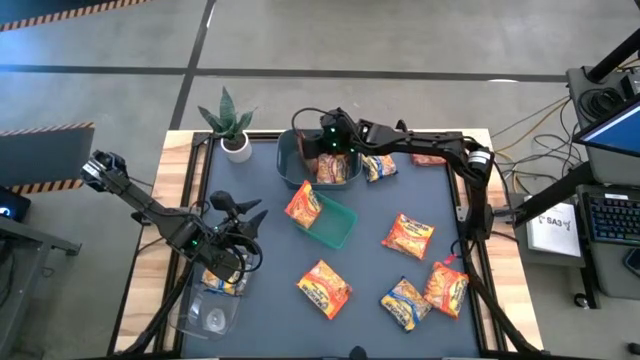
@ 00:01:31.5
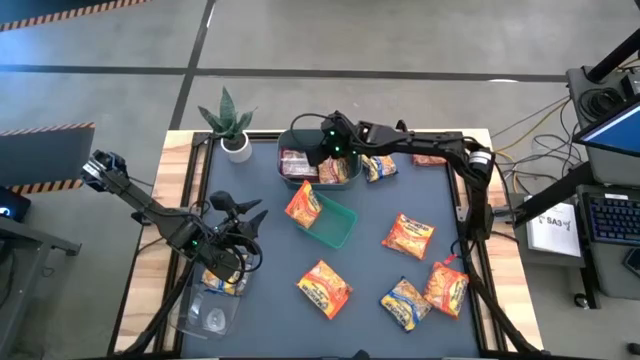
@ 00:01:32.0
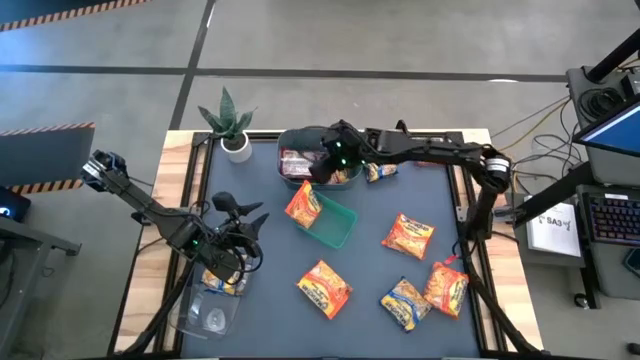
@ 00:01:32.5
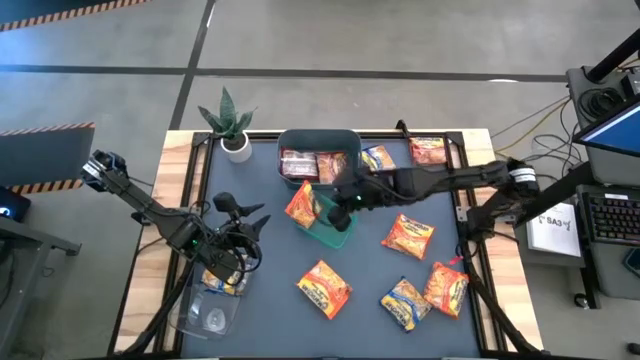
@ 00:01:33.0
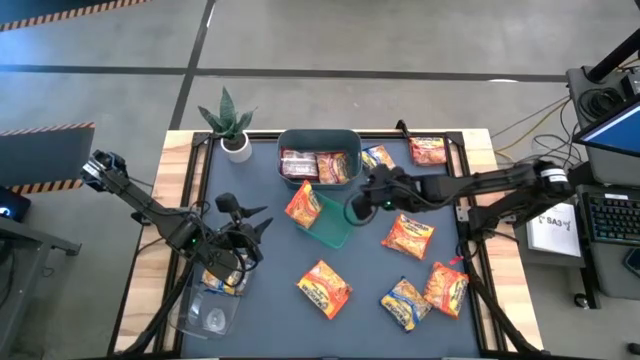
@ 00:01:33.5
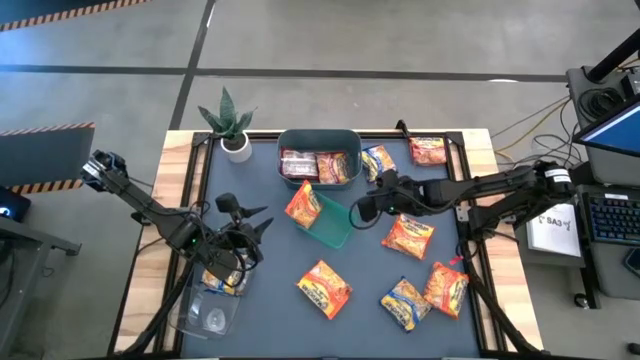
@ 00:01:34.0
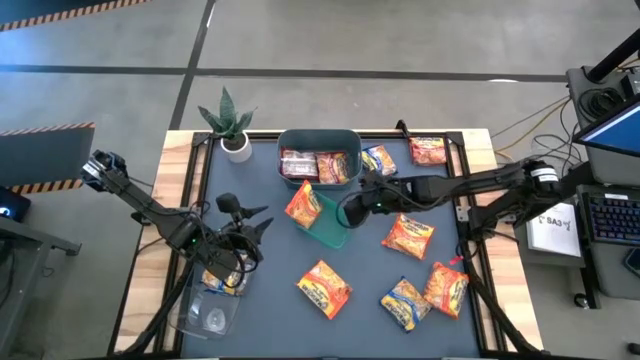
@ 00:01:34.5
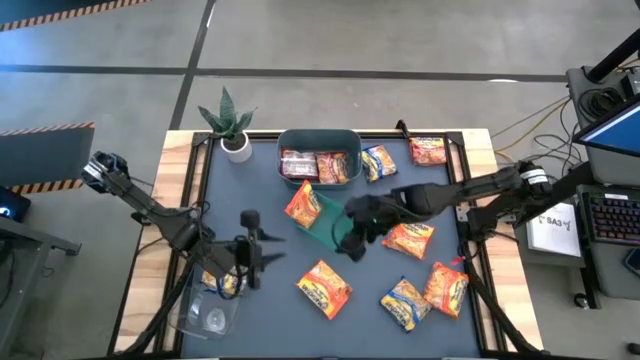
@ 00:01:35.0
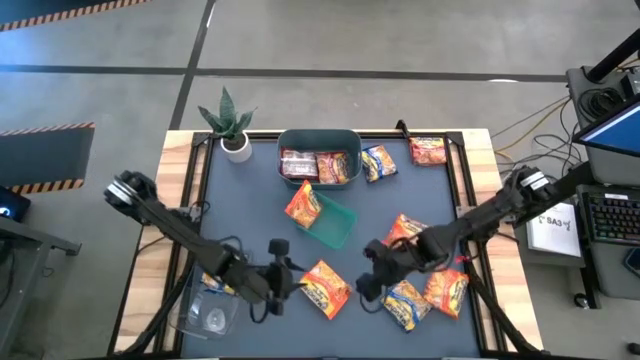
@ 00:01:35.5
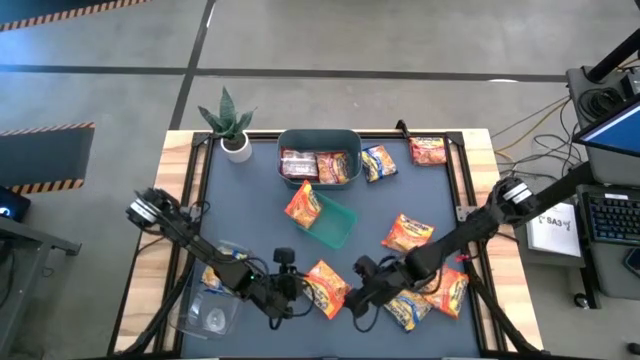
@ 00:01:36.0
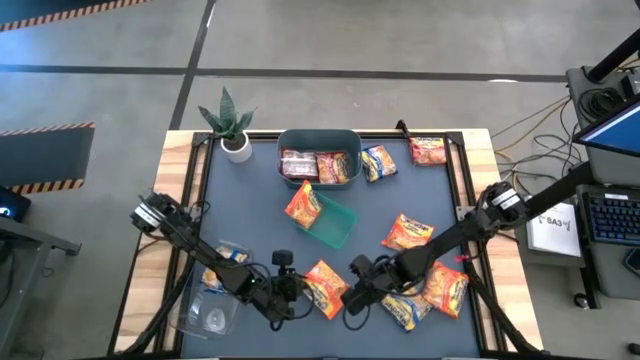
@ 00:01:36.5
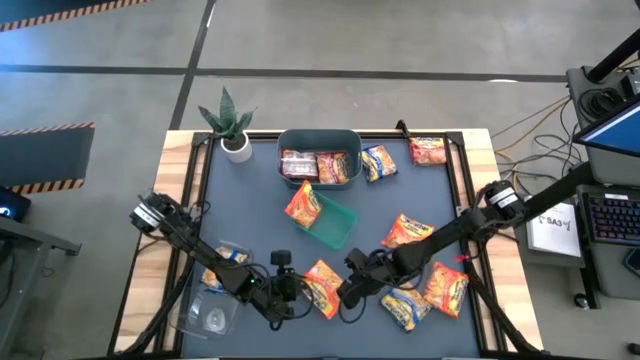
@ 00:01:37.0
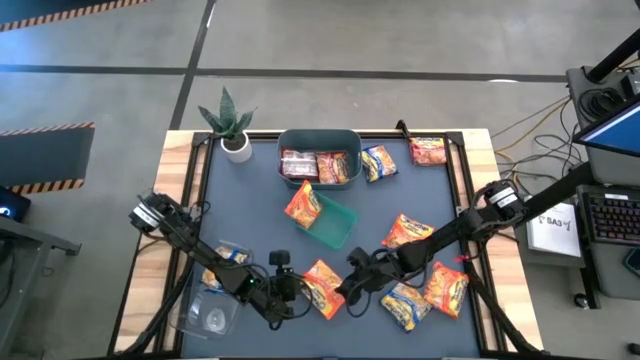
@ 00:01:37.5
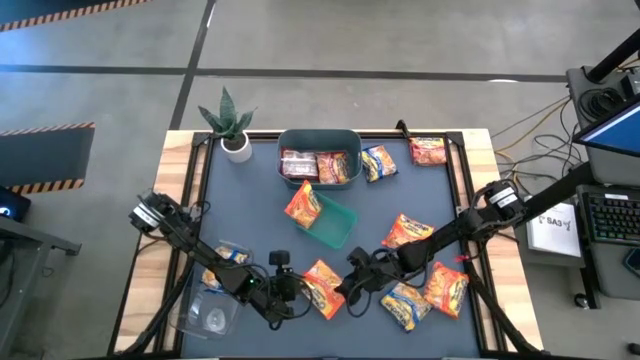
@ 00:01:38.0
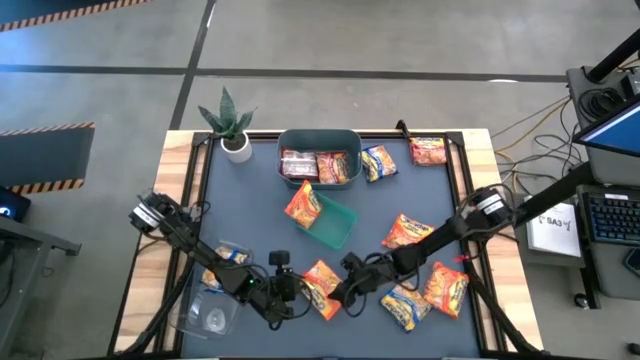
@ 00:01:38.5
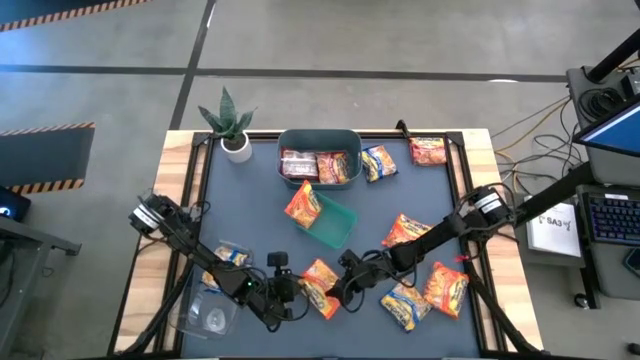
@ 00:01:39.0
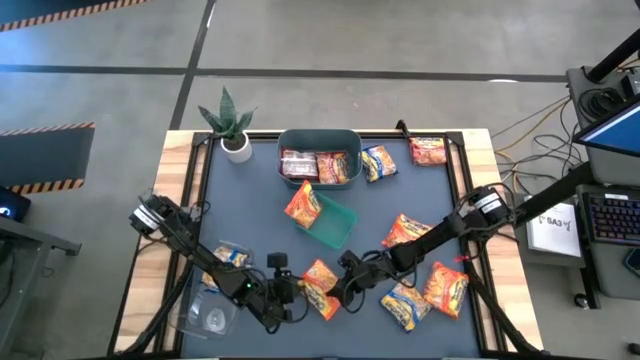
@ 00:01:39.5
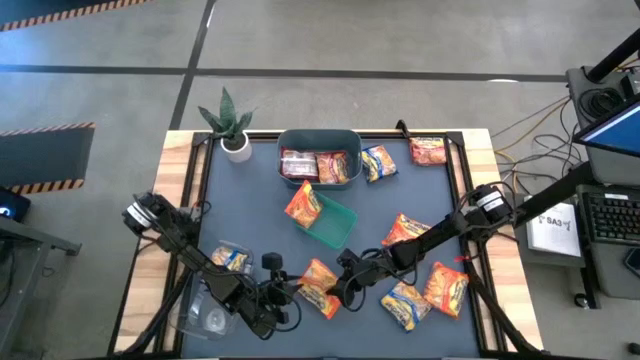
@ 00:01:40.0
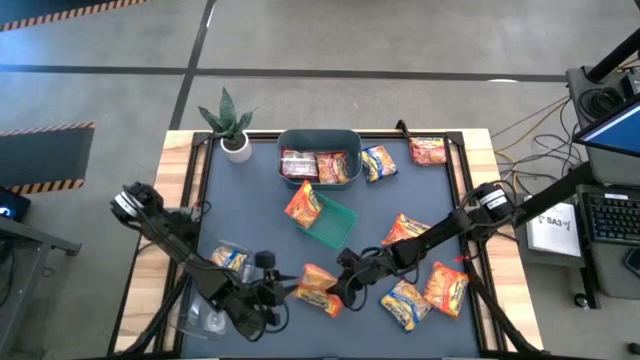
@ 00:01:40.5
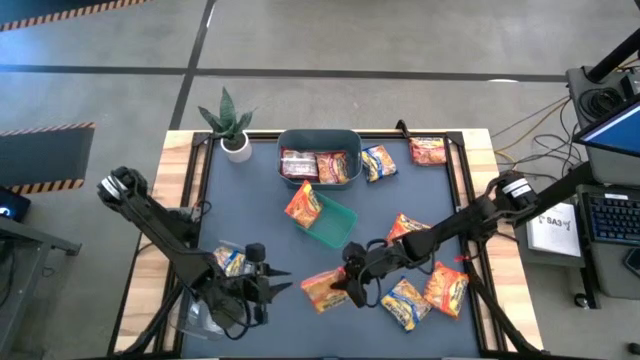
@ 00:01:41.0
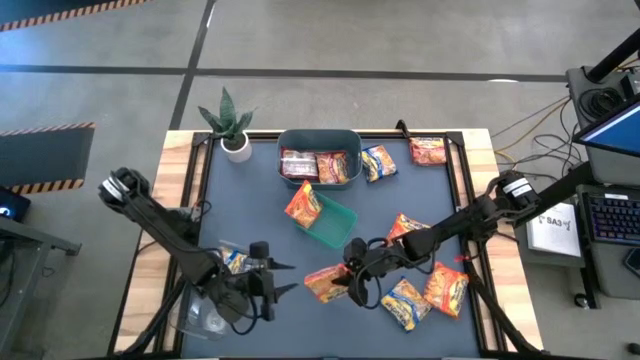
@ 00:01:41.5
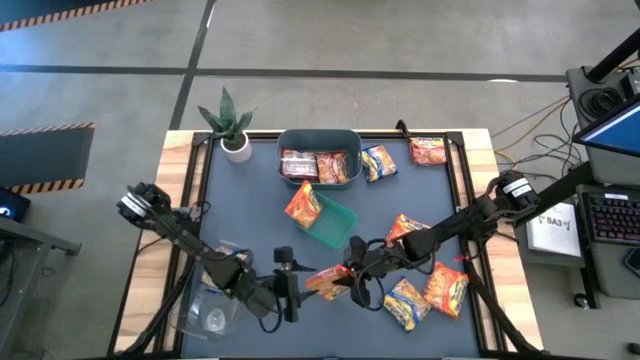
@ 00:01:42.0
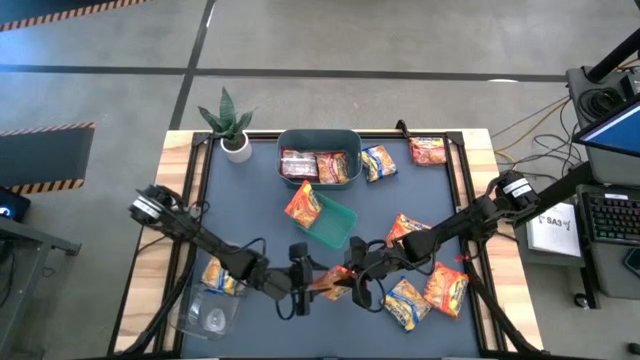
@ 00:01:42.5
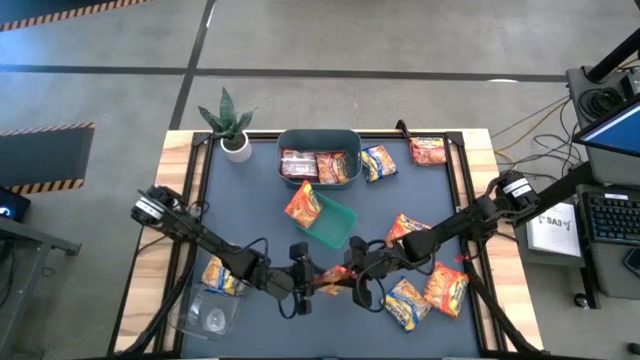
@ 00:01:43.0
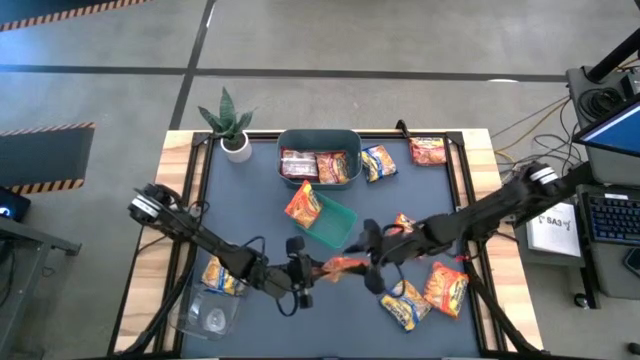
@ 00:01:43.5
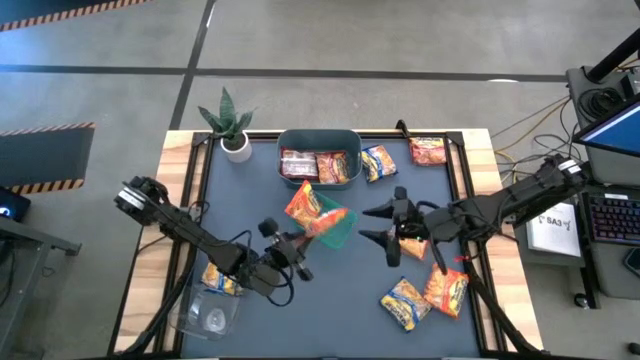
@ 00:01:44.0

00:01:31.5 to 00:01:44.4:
Task: Sort Maruchan noodles
Put the orange noodle pack into the green bin

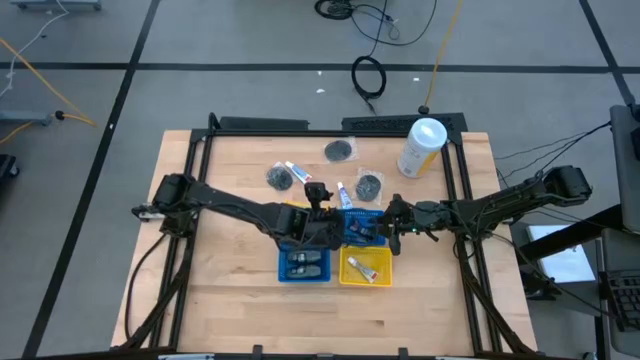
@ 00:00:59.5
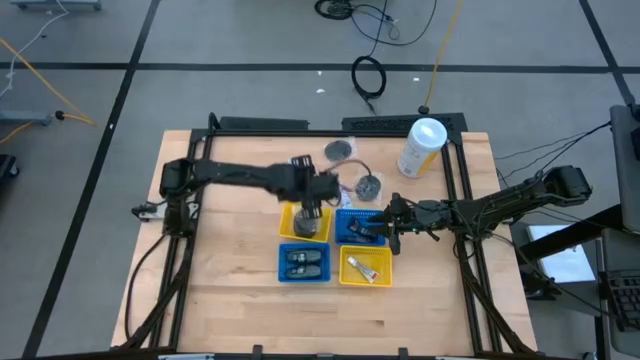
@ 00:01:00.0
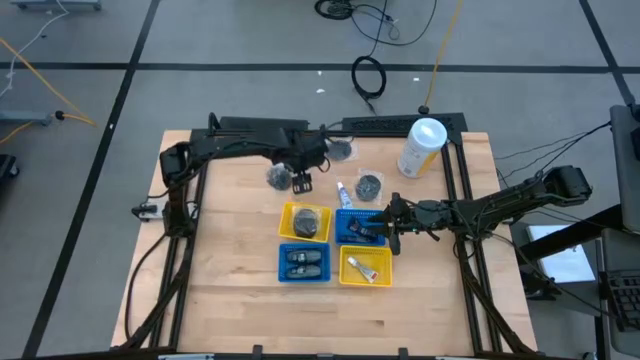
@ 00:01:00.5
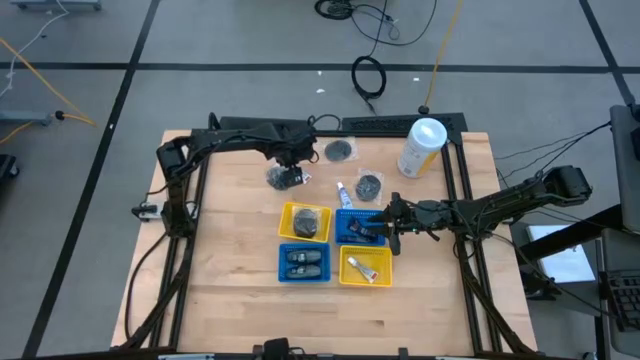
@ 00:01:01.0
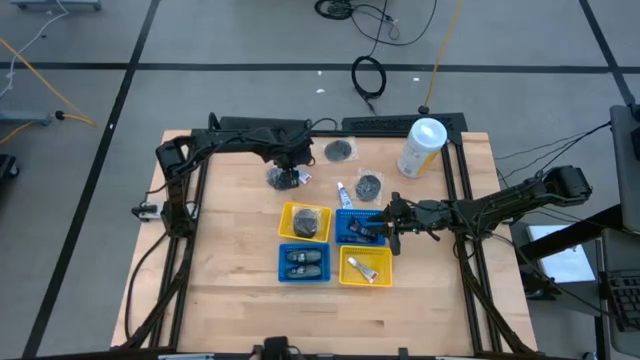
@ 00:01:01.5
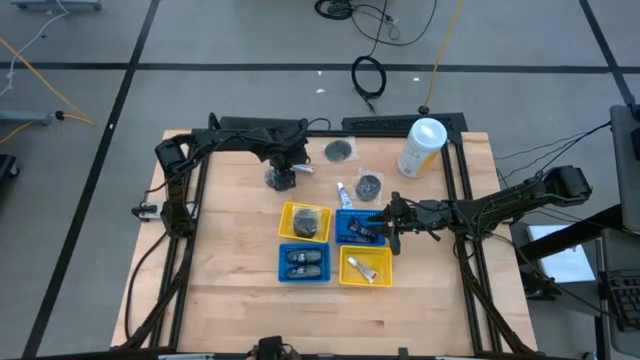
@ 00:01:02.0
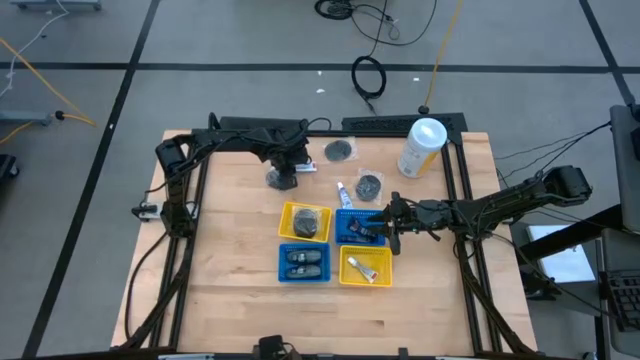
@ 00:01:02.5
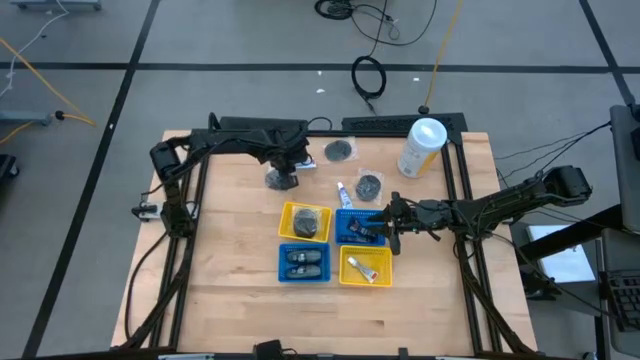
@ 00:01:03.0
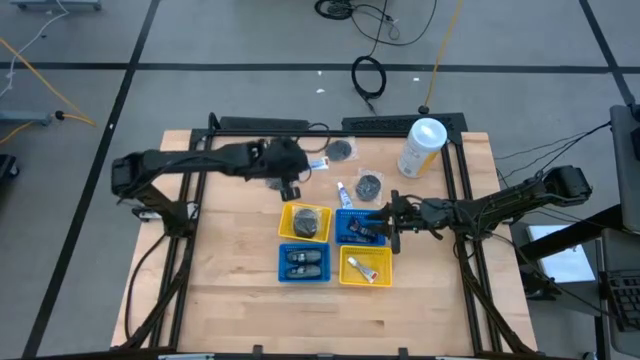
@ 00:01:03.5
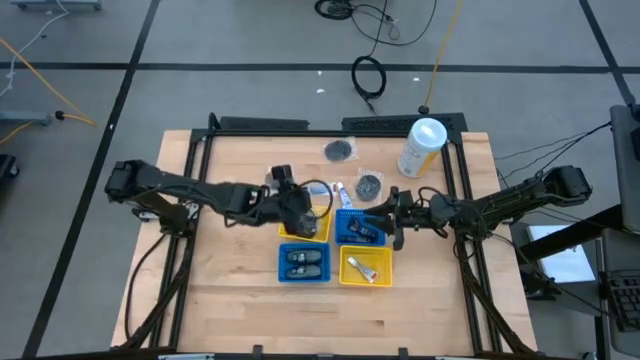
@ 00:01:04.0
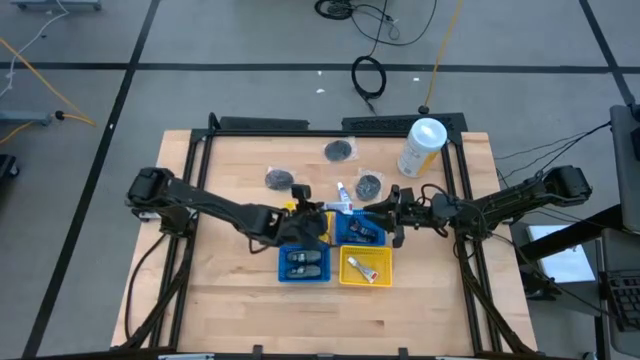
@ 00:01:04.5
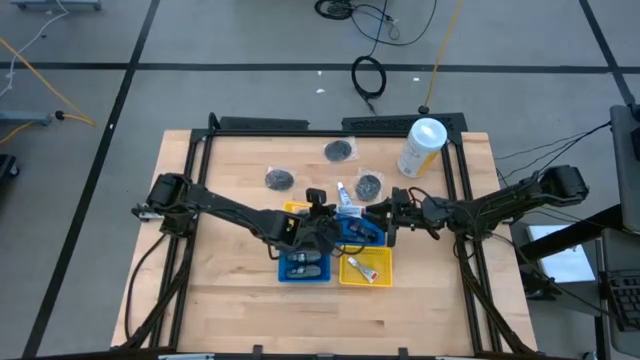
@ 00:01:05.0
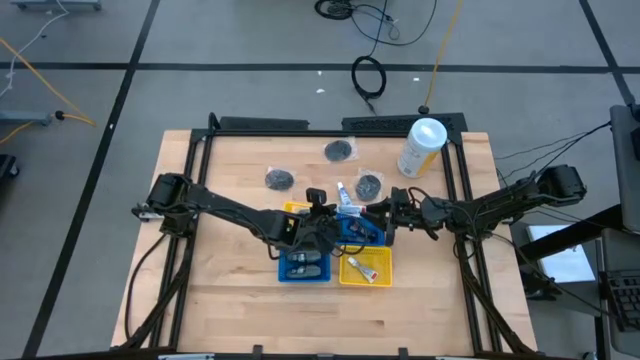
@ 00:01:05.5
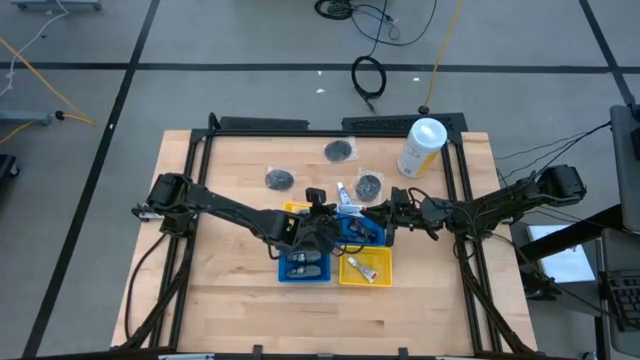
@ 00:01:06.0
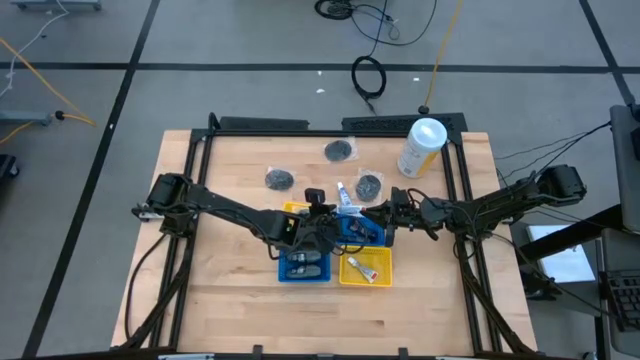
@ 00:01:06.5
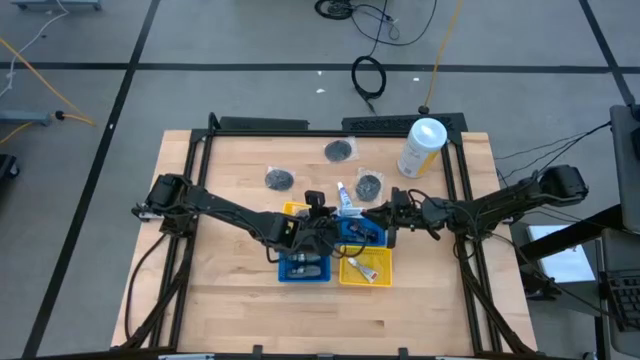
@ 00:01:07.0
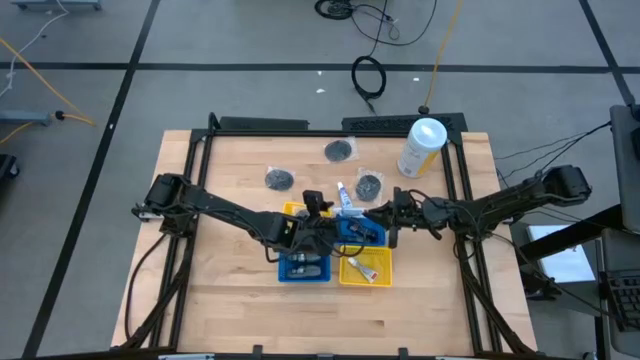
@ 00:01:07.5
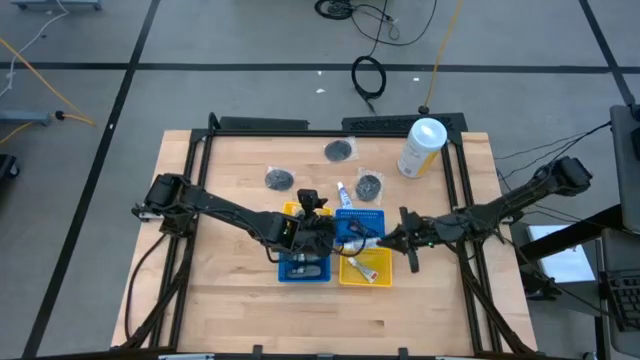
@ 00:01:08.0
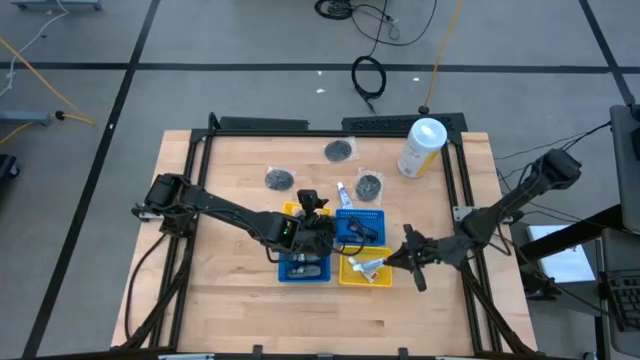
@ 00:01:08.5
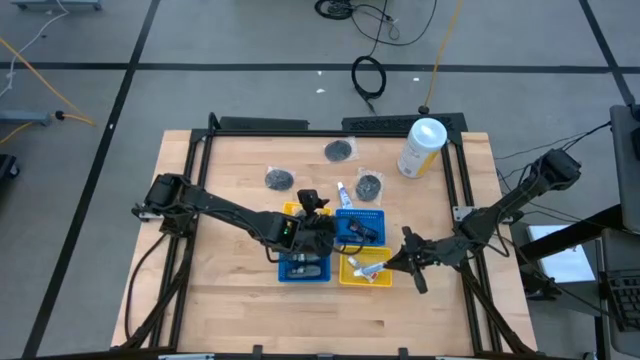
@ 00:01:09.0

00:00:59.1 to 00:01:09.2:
Task: Pick & Place Travel size toiletries
Put the white toothpaste into the bottom yellow basket
